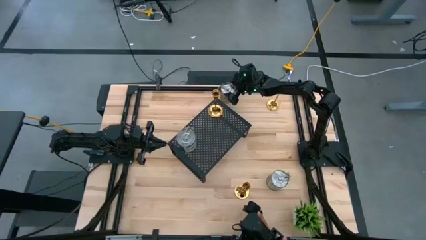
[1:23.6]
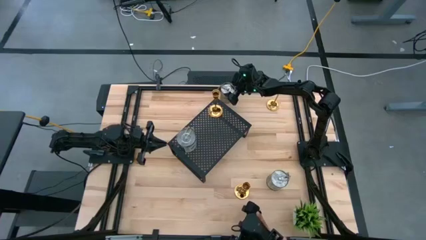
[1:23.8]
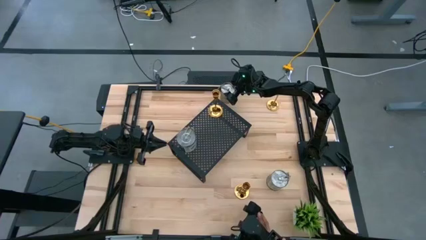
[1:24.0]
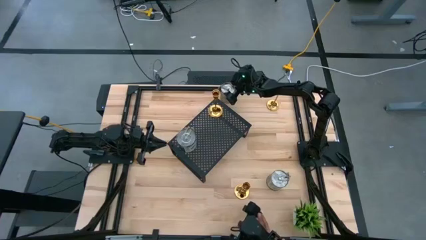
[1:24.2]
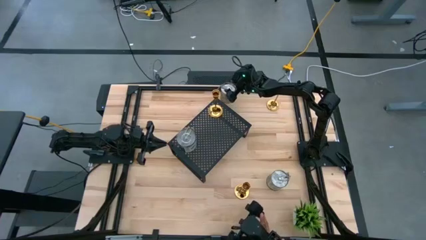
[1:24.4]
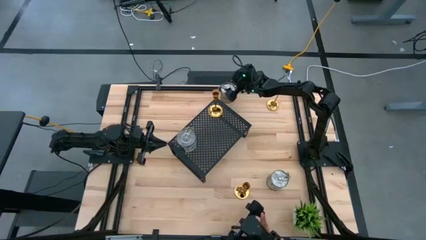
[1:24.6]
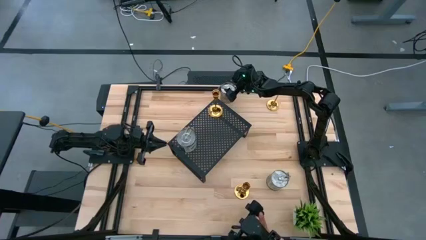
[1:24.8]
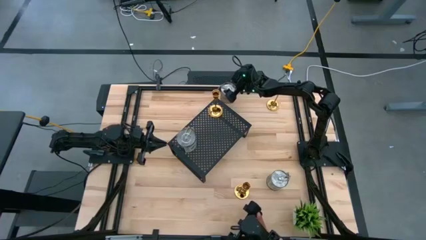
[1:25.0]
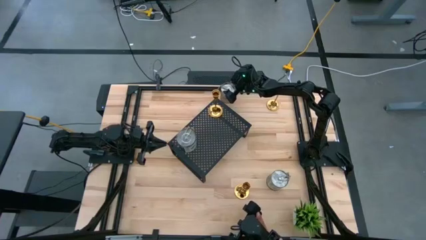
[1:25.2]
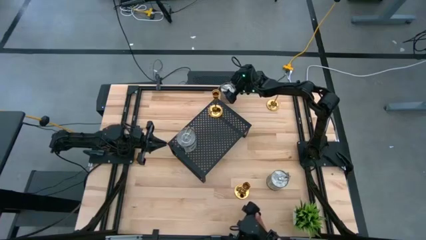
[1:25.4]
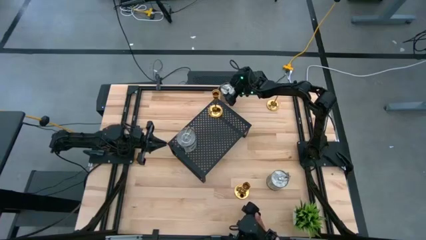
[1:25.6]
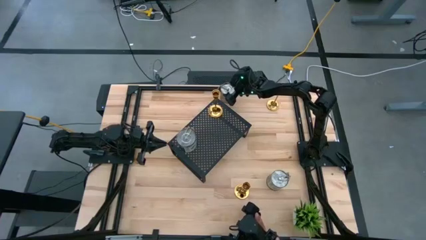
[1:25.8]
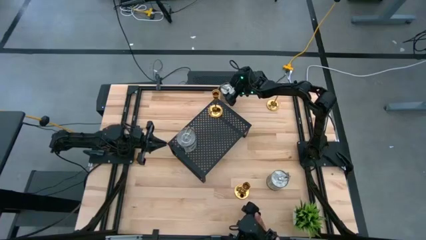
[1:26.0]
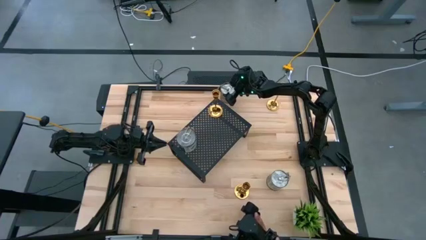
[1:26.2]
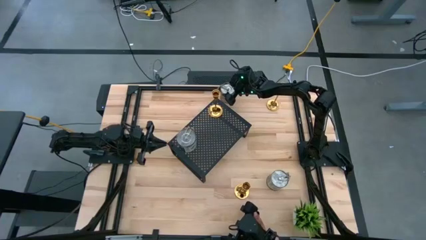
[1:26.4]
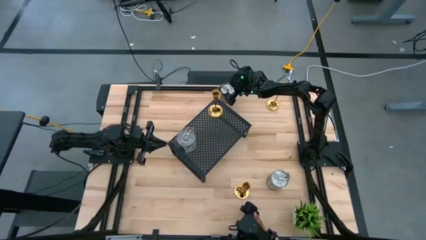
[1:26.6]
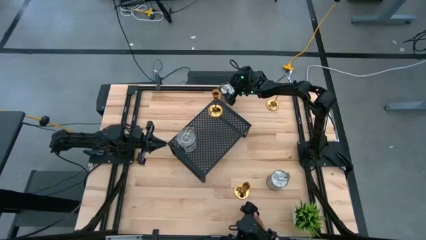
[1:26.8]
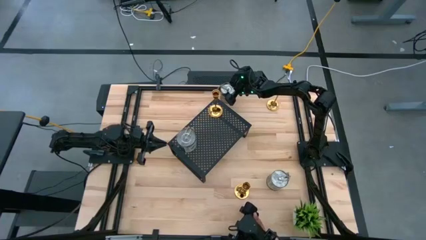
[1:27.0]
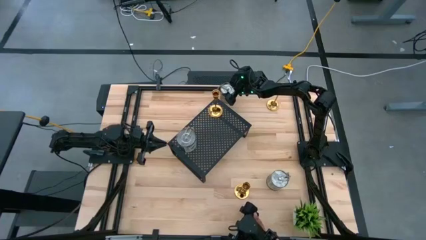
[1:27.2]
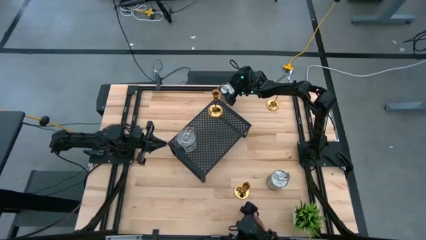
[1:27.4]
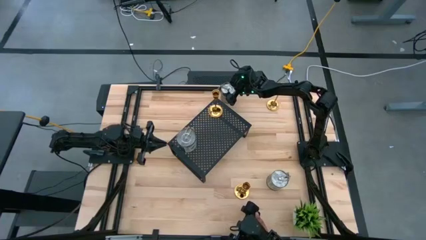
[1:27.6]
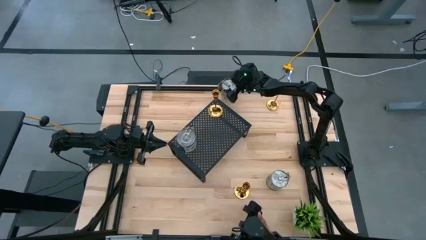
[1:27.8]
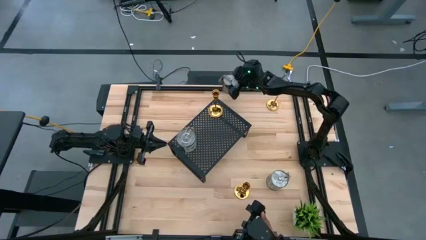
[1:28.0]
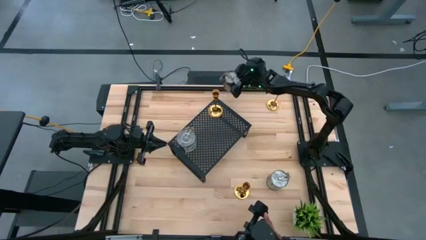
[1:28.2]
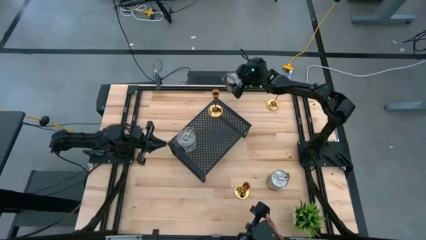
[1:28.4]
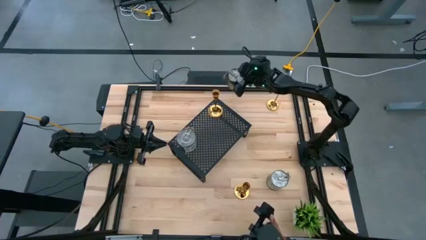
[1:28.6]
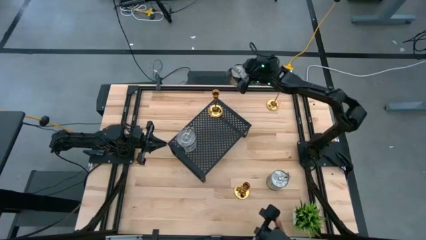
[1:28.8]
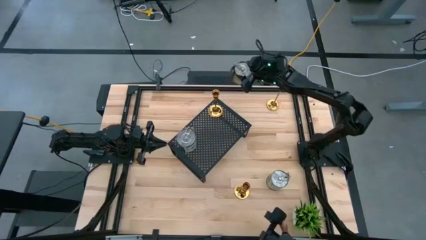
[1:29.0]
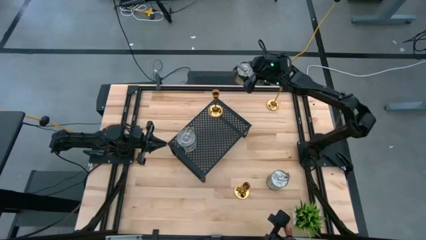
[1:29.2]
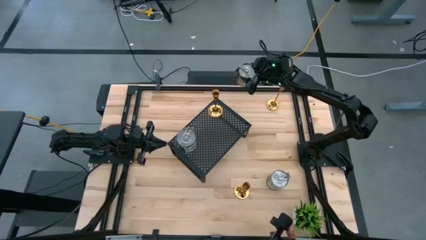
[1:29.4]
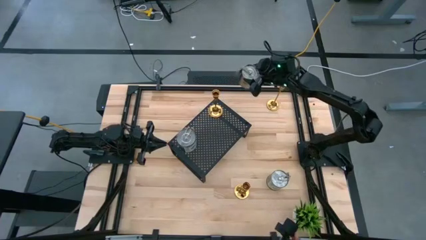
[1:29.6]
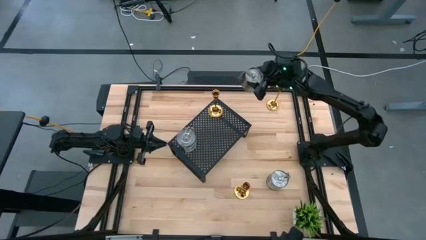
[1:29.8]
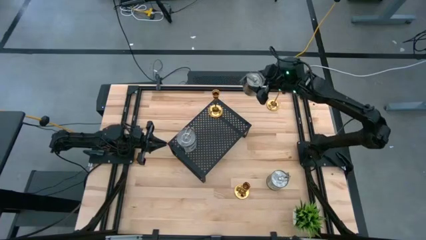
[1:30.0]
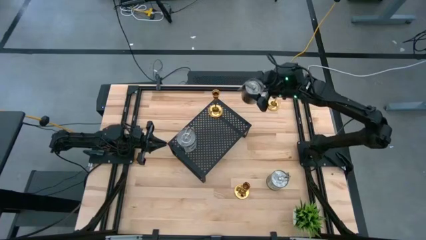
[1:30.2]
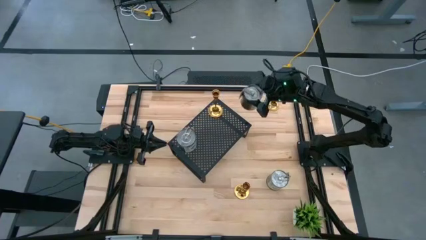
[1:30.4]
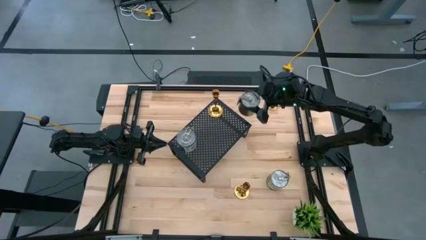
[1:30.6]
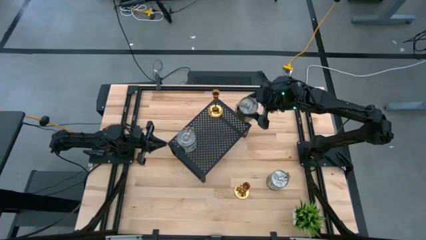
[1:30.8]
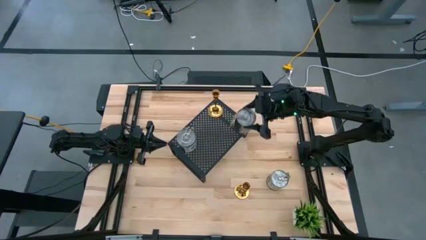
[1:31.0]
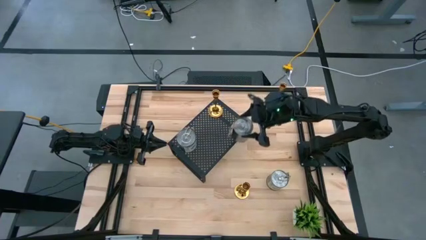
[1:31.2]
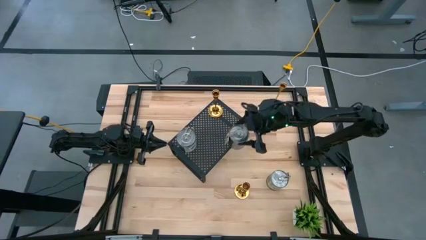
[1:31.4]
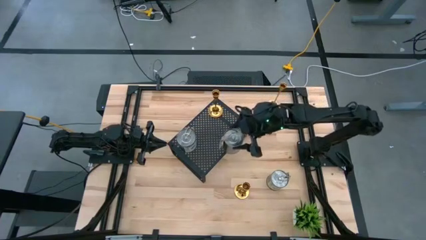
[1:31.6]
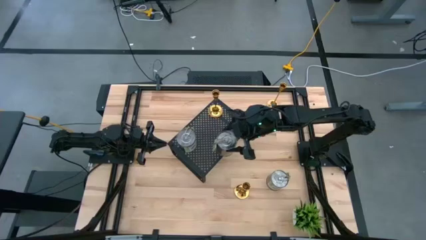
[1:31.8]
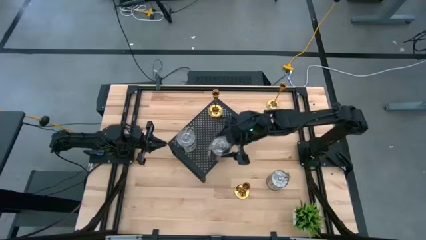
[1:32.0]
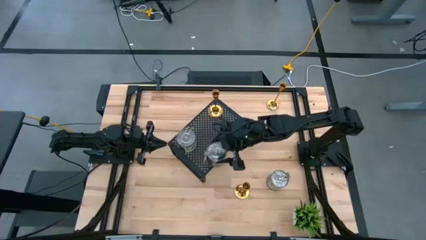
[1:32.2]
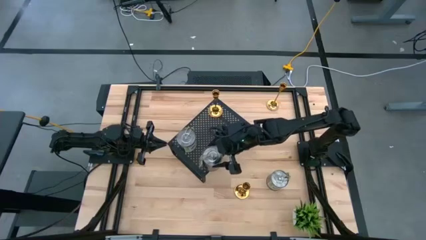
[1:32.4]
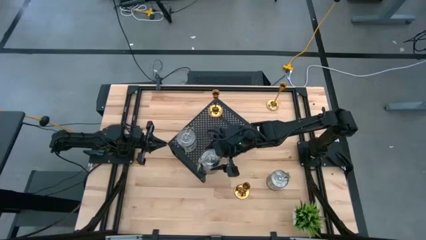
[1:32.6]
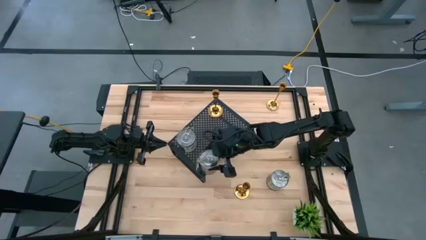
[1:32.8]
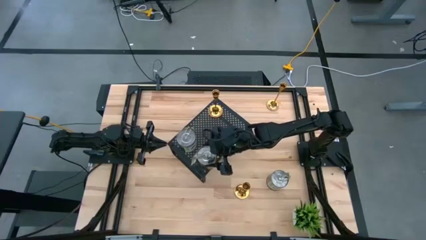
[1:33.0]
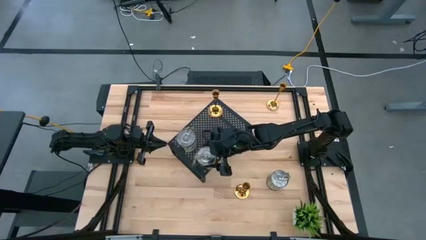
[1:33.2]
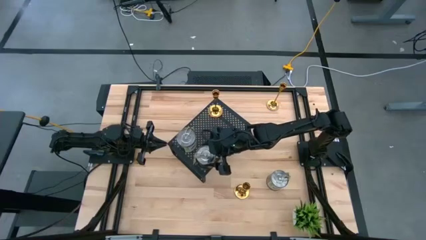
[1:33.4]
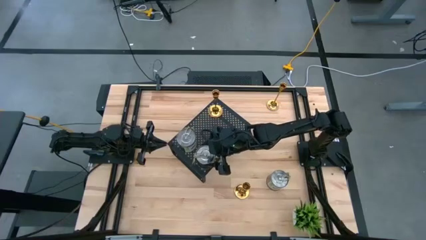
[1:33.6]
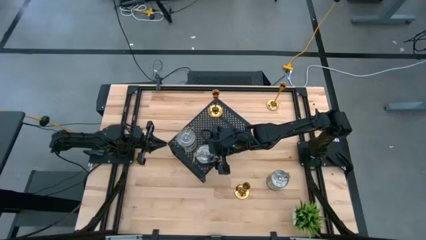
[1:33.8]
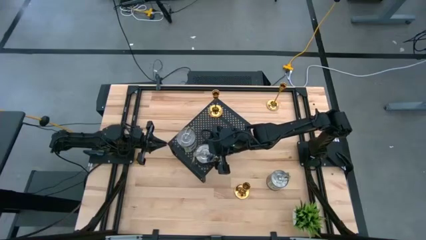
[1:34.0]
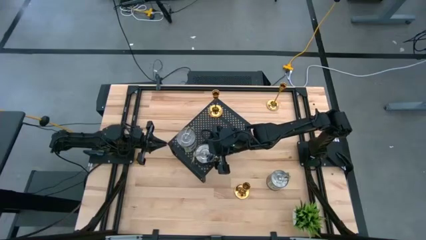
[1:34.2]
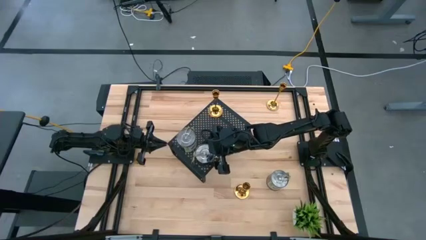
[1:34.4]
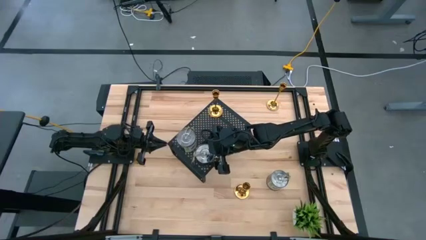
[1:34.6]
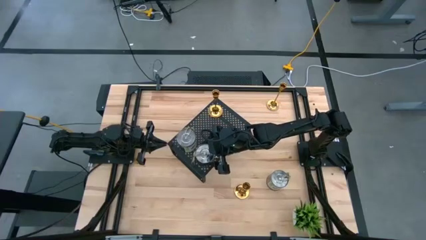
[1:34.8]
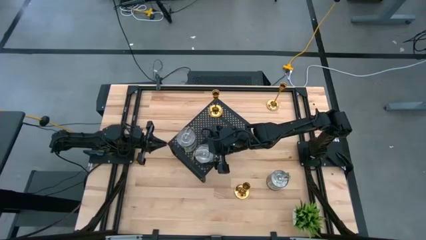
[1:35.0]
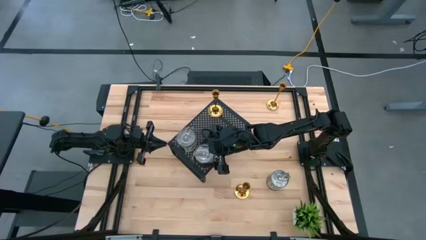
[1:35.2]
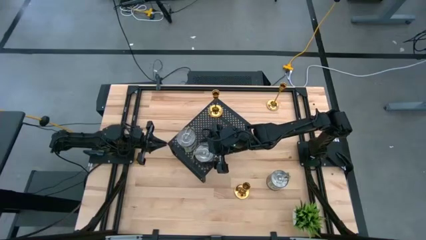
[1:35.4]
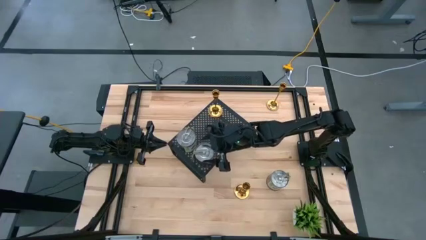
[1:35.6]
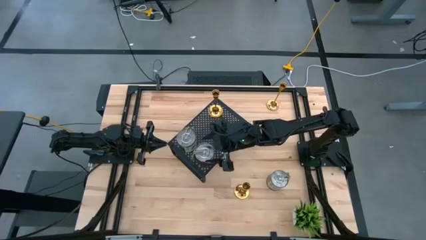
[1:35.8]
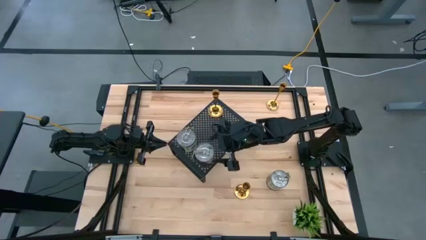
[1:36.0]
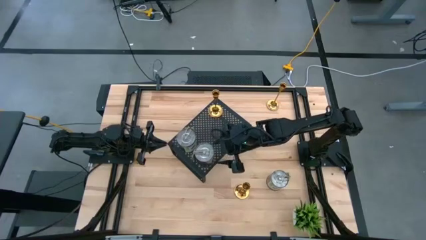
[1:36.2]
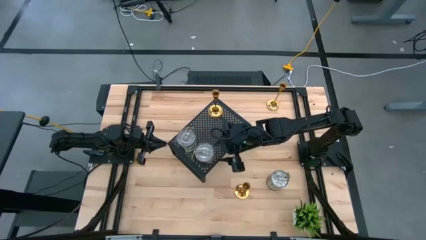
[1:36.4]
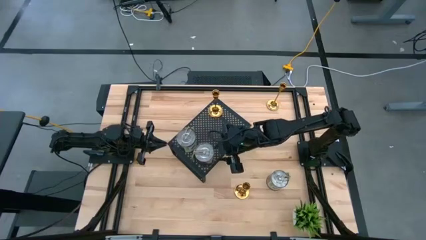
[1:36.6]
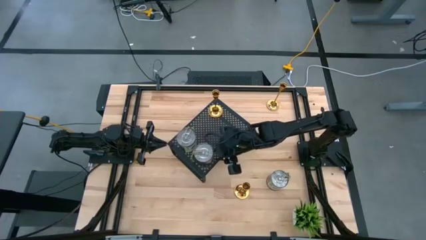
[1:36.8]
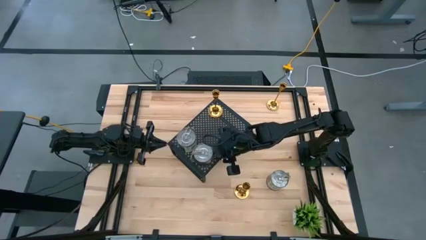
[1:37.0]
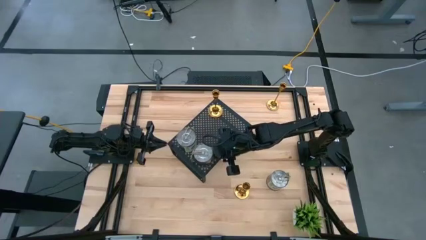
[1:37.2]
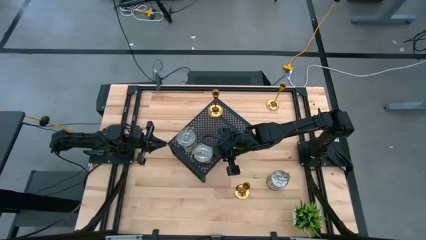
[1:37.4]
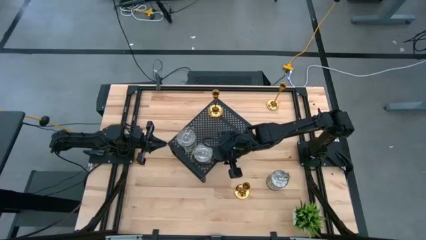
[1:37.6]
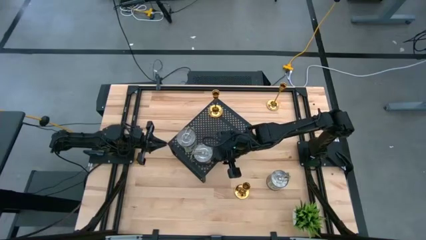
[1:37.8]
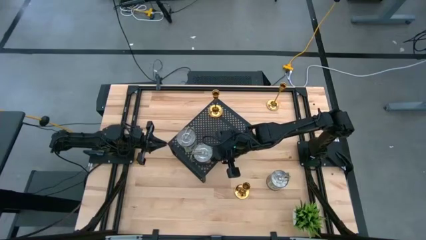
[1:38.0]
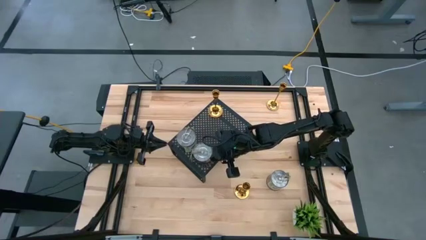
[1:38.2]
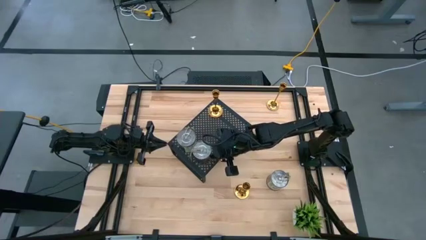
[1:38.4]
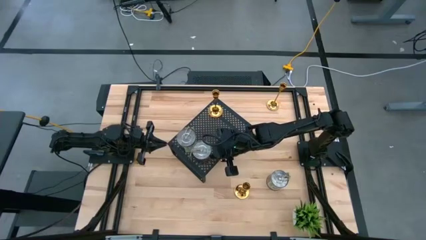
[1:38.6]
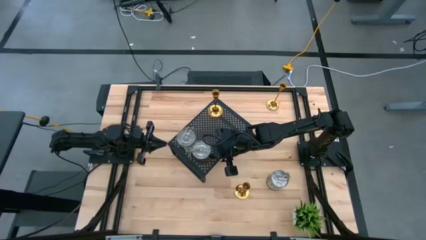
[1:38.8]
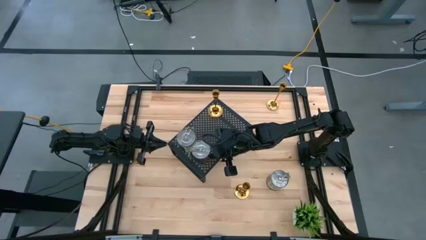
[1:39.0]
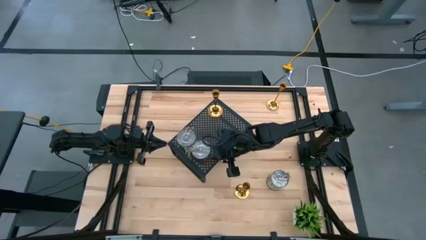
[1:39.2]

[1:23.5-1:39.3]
Task: Pick & Place candle stick holders
Put the top silver scented candle on the shelf aligned with the other silver scented candle
